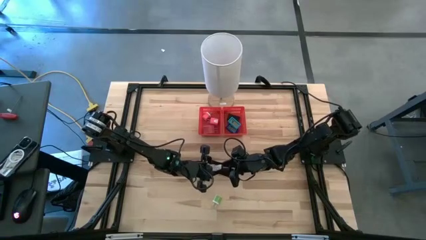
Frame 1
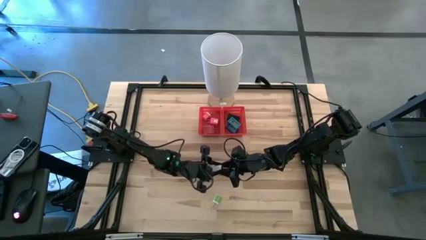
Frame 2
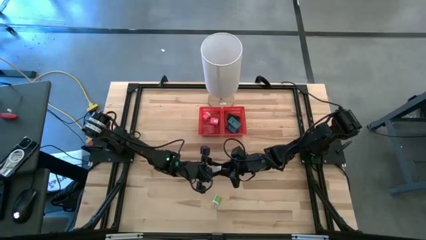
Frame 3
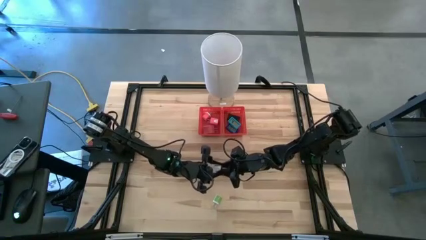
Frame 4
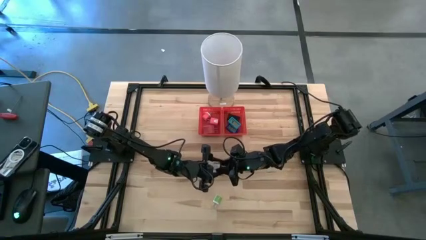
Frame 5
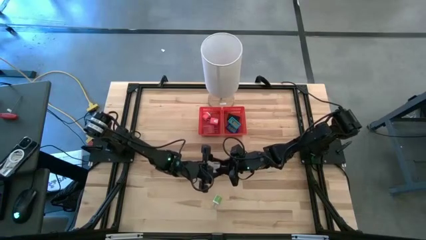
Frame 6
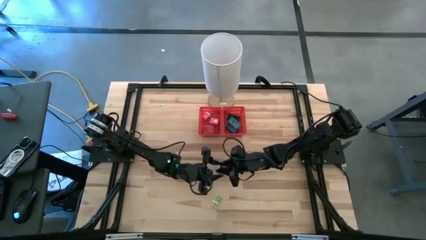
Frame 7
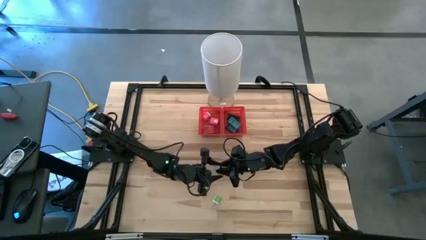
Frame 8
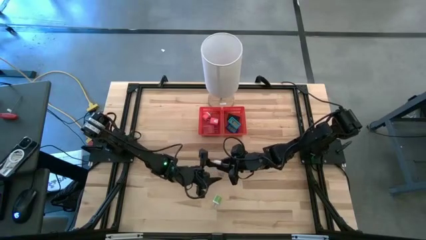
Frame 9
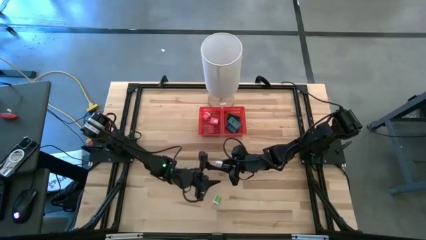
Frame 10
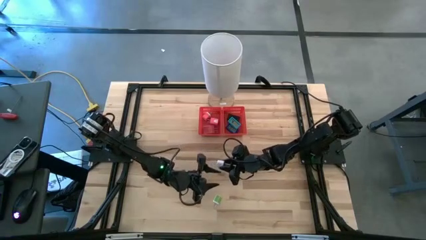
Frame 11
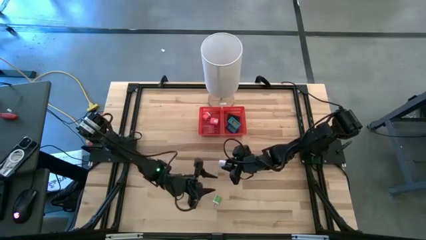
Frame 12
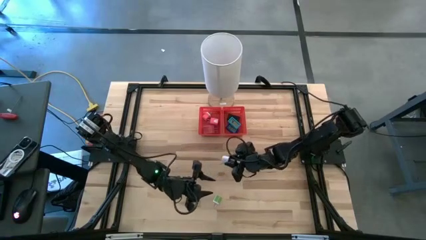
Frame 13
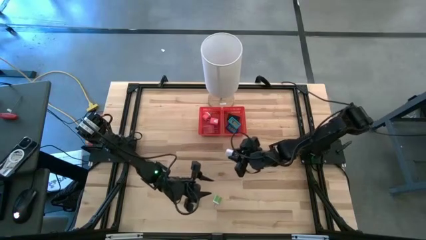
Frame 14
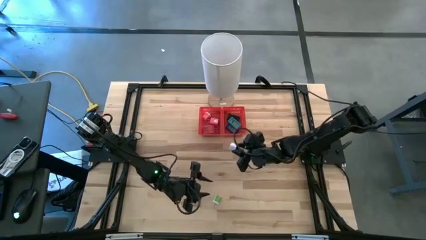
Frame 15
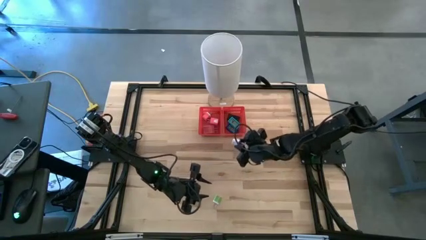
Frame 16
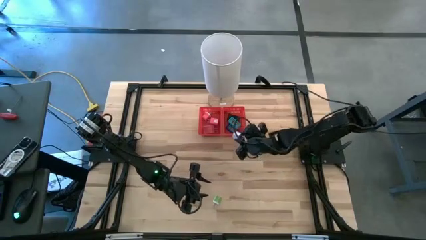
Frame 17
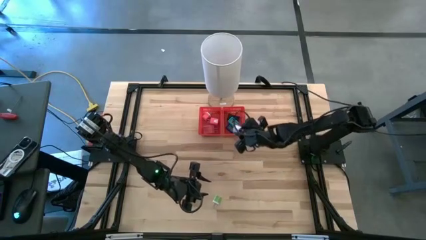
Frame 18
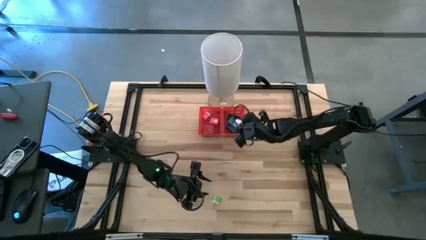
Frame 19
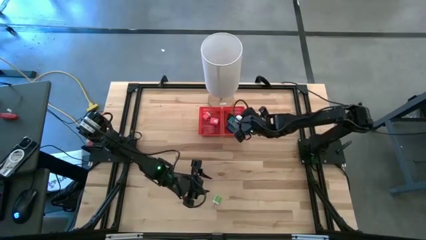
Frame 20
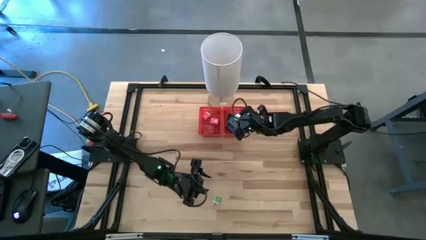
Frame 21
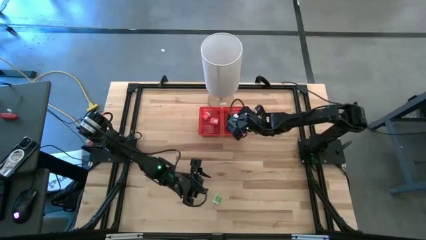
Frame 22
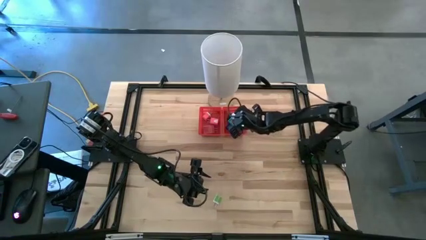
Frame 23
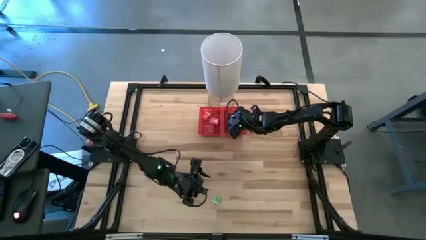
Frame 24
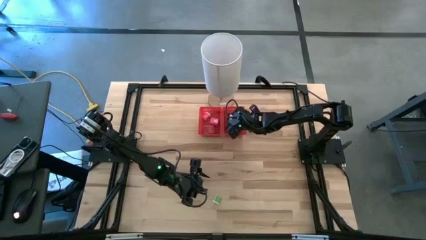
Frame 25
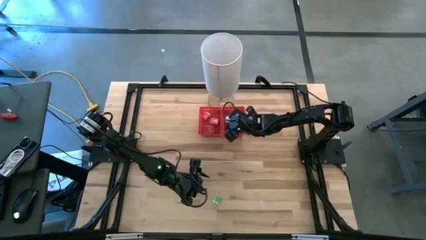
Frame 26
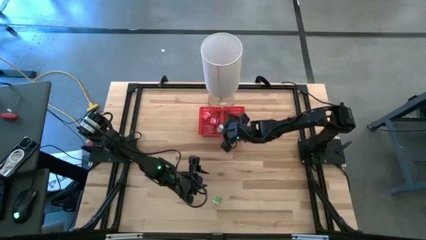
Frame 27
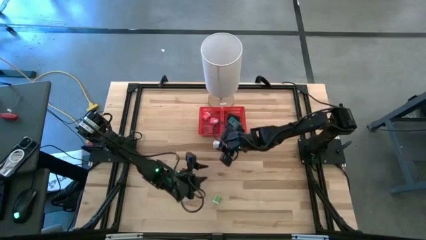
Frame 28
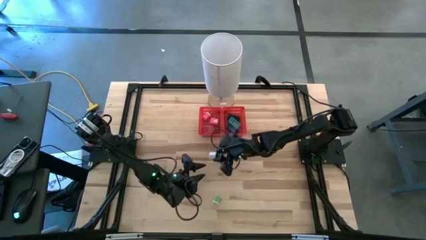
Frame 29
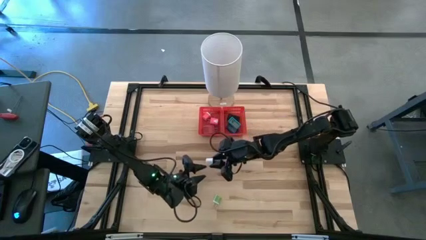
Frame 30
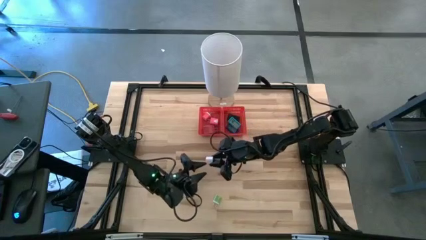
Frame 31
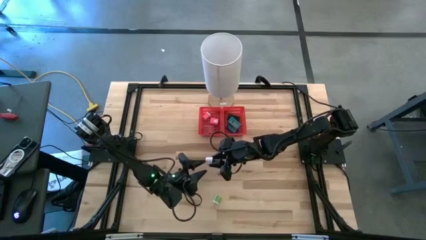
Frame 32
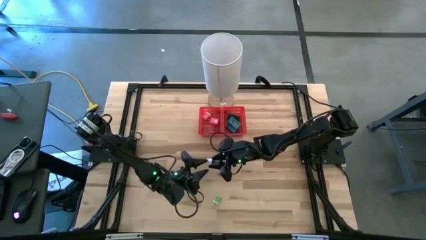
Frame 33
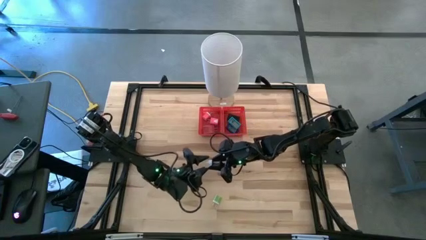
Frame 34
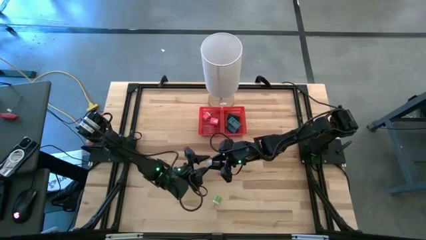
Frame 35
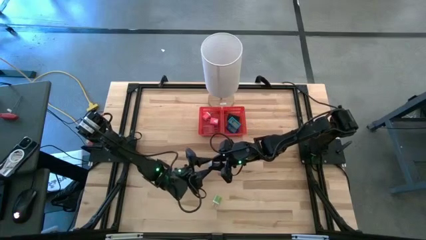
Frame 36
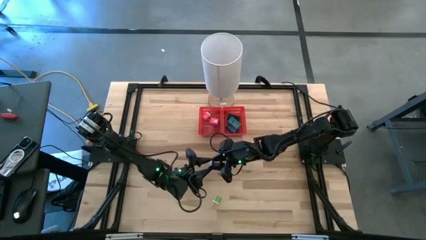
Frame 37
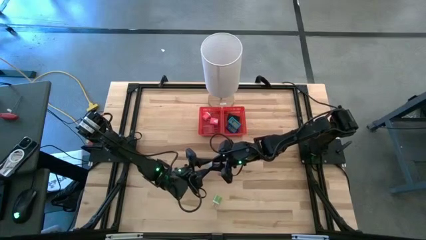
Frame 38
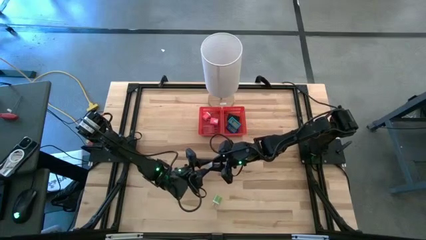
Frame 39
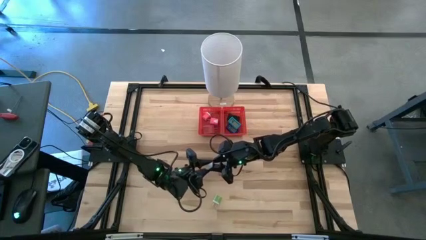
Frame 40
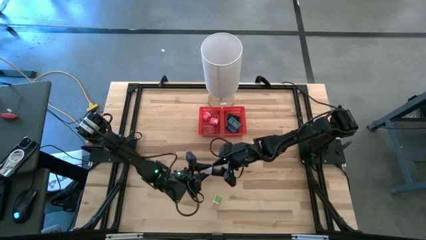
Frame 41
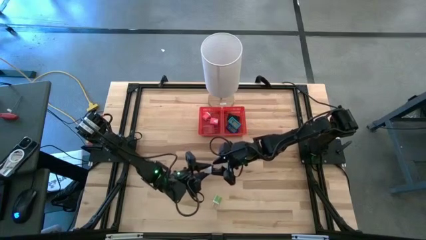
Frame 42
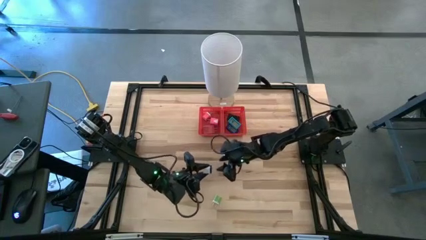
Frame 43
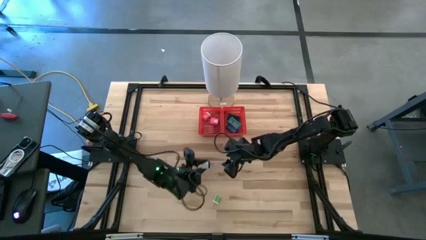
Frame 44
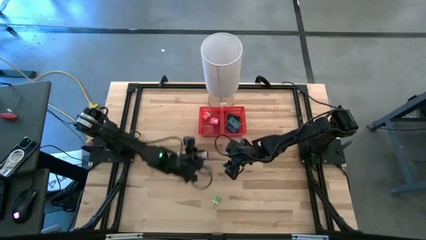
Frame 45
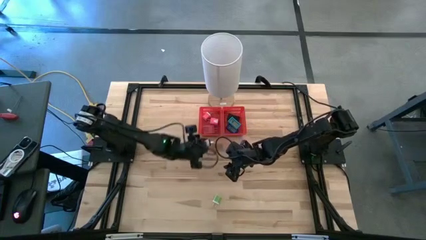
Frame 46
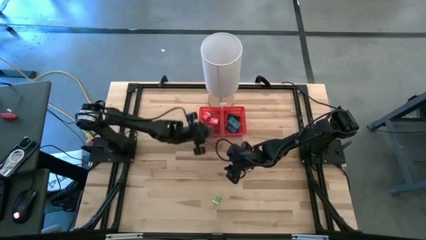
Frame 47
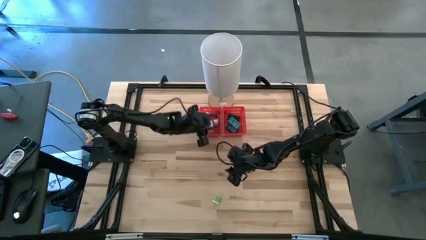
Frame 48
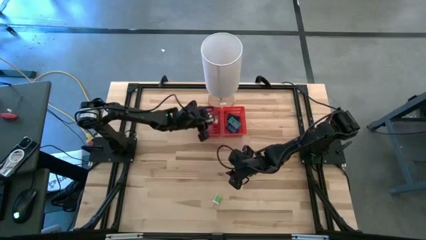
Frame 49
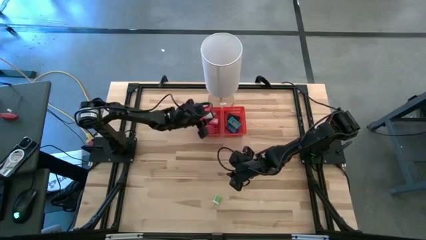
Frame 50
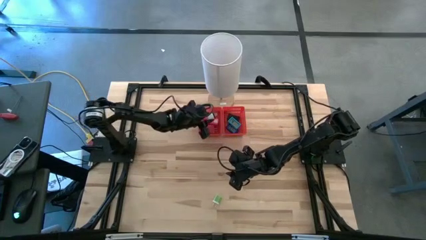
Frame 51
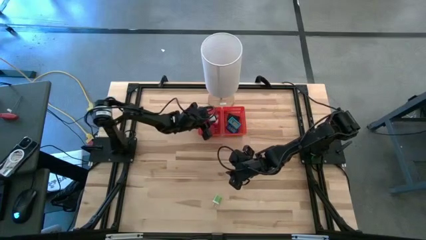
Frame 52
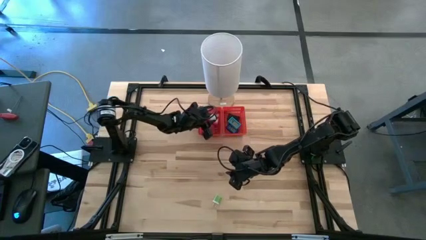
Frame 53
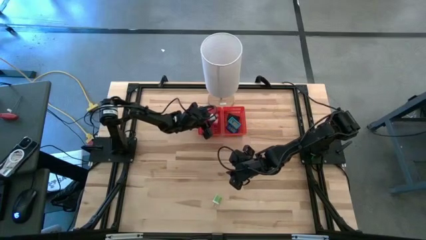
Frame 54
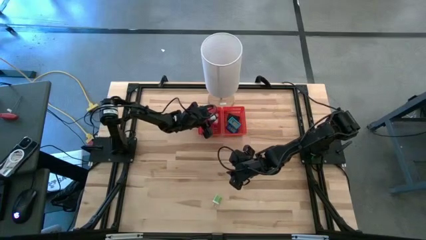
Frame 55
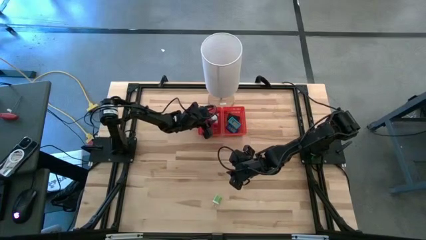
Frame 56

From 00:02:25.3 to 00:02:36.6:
Task: Pick & Place Office items
Put the white charger adapter into the left red bin

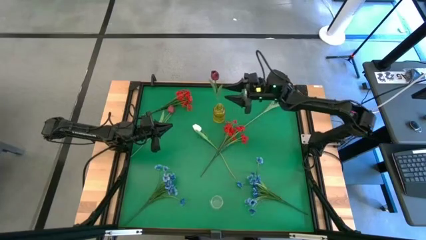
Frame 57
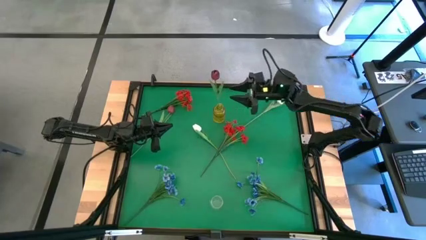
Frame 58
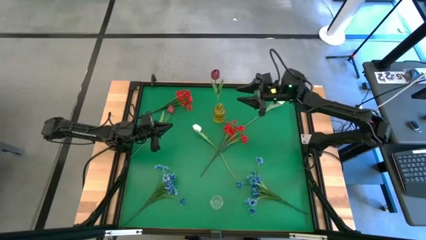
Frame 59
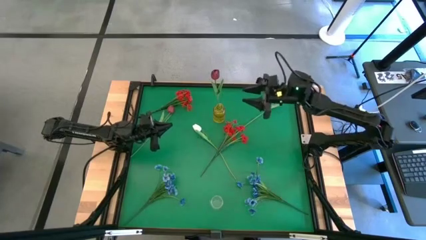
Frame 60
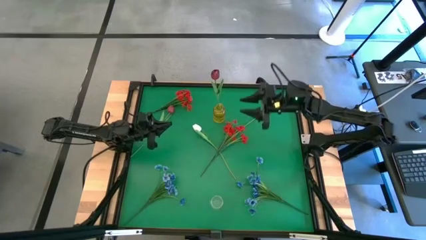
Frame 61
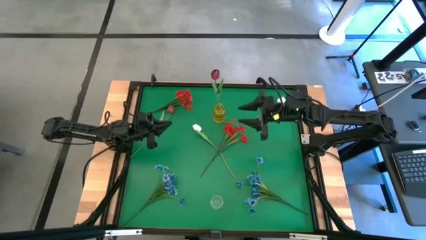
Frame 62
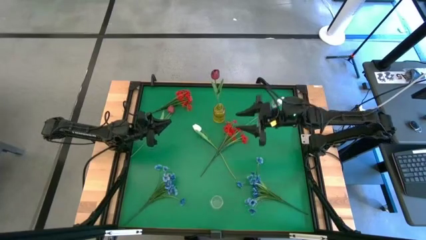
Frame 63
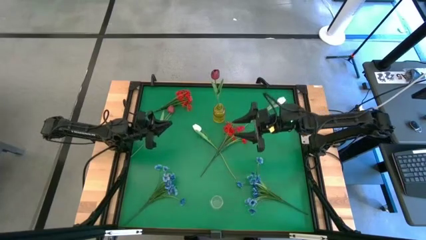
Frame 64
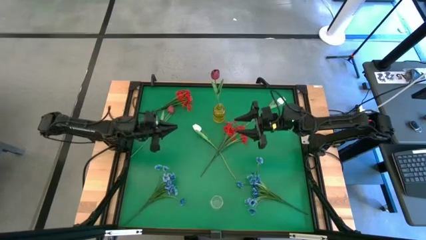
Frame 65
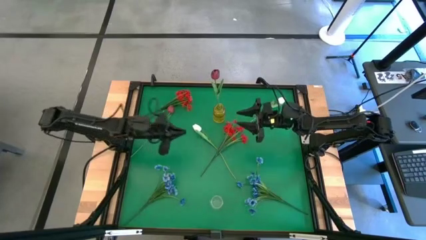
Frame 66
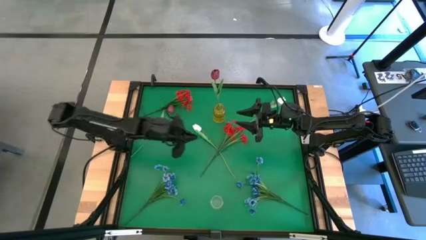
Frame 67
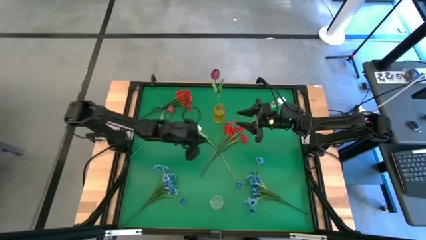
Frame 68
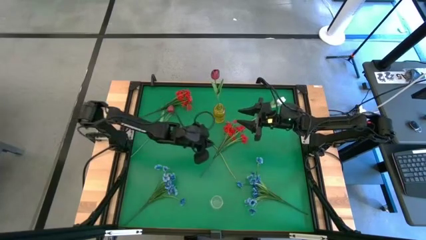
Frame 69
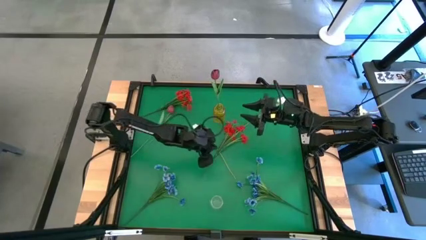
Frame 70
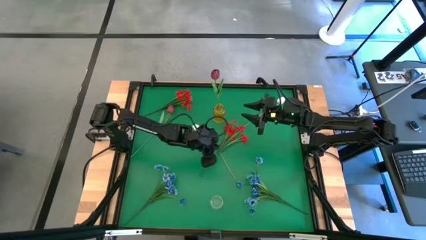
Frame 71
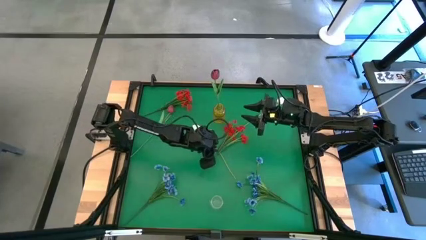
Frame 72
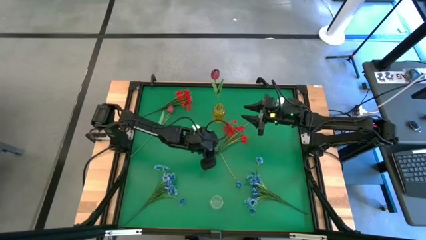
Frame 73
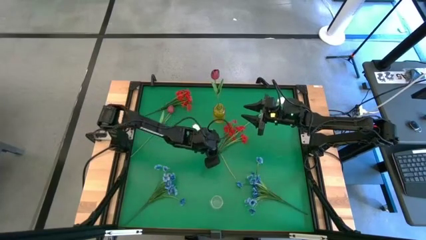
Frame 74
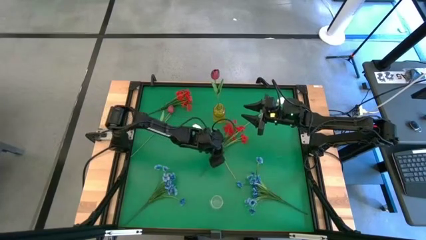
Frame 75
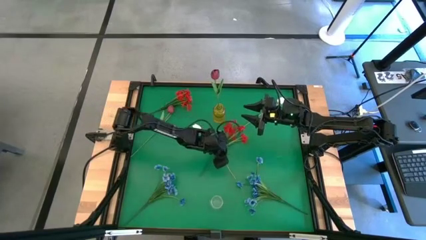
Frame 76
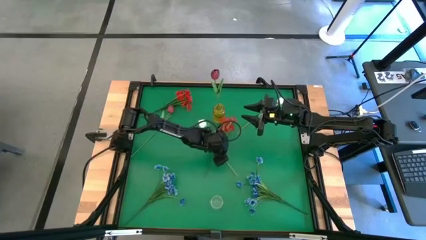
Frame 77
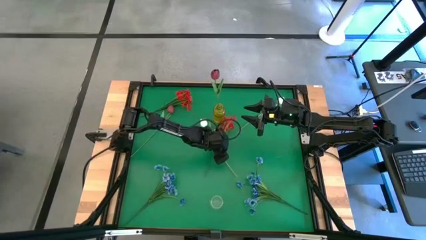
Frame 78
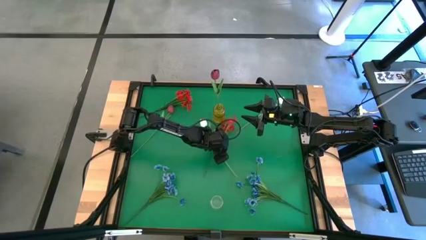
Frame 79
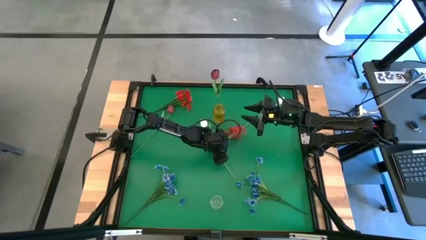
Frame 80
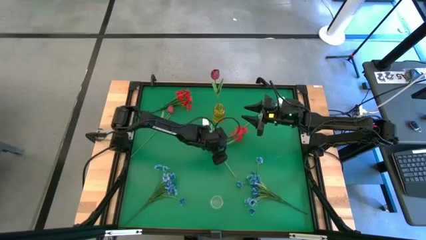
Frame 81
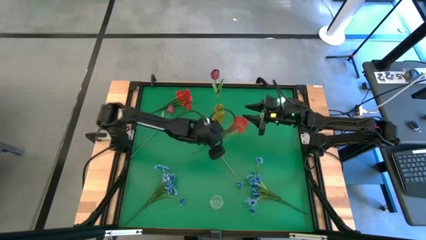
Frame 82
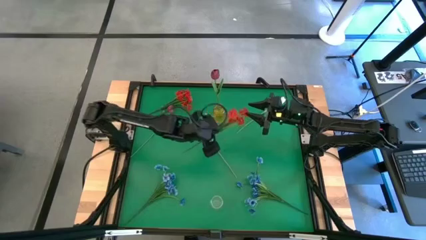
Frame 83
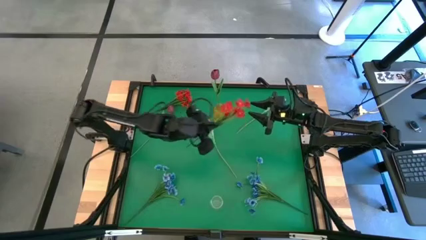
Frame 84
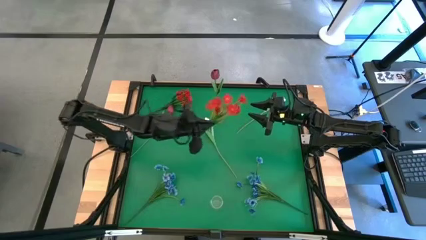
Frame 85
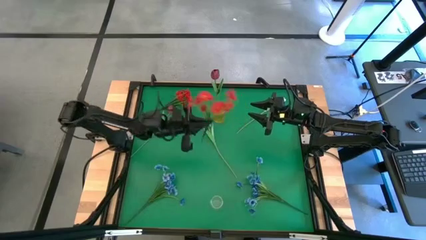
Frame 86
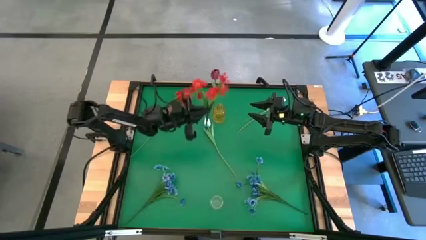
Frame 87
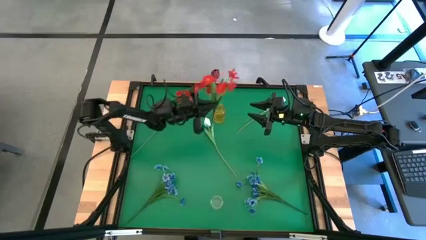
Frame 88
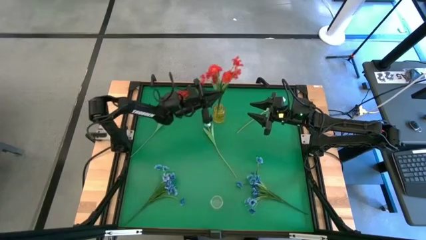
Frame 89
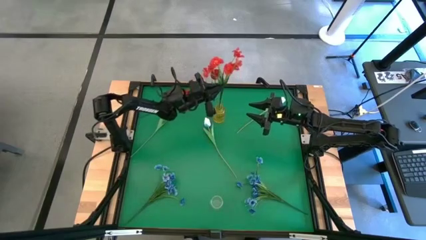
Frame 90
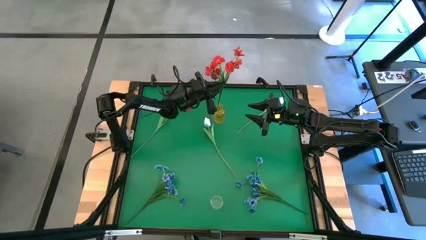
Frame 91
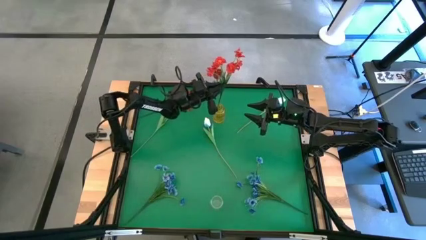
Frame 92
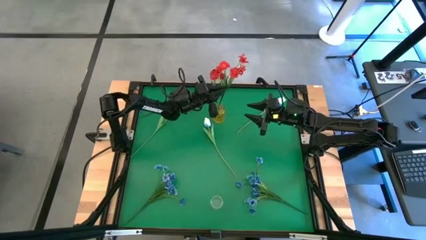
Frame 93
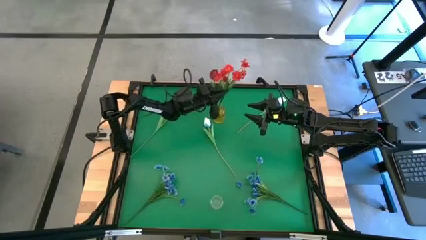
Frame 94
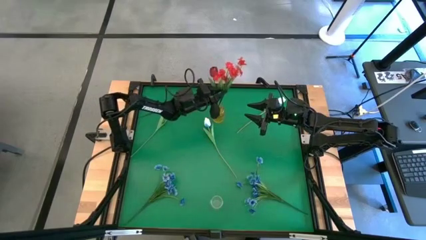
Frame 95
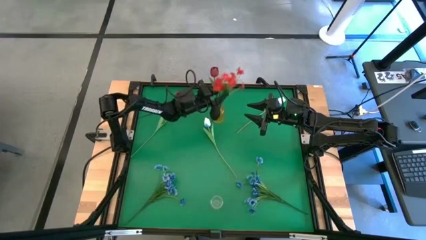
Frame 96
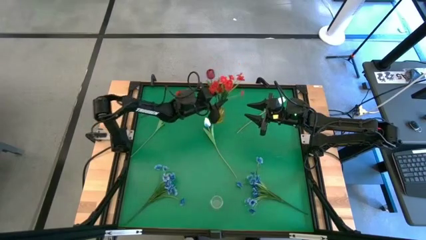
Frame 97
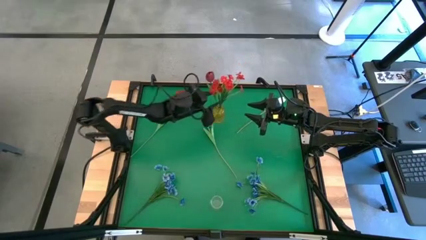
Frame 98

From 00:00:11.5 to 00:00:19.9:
Task: Sort flowers into vase by color
Put the bottom red flowers into the yellow vase
